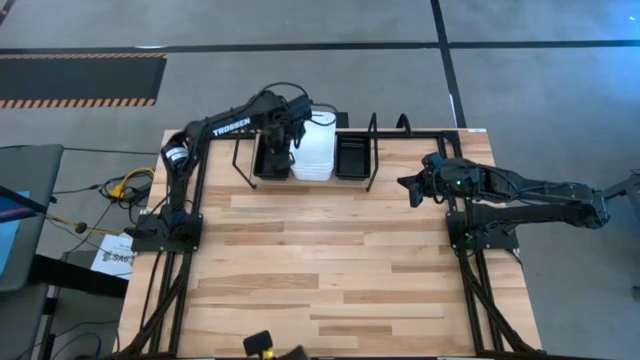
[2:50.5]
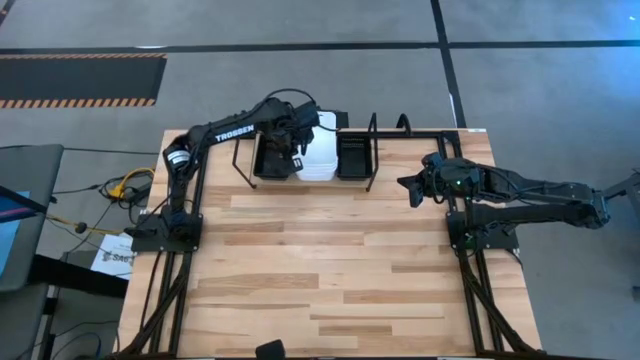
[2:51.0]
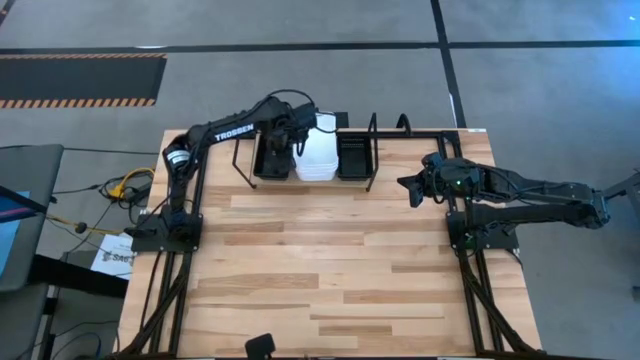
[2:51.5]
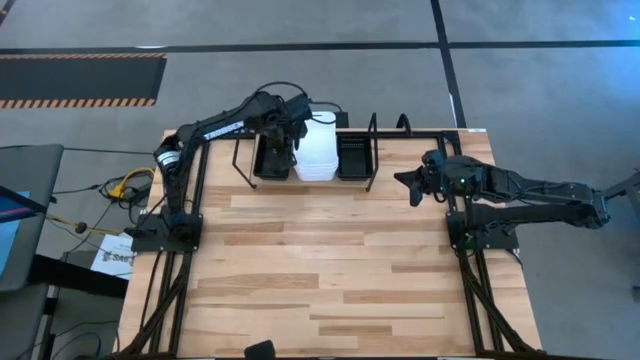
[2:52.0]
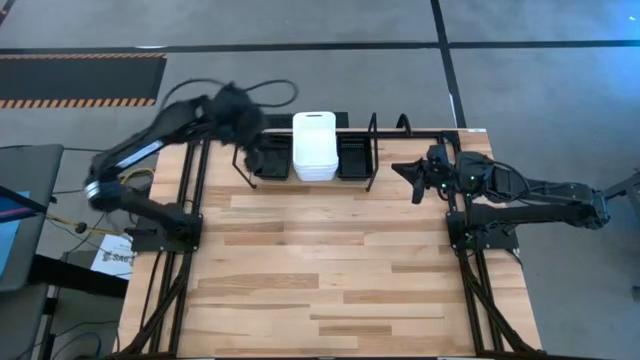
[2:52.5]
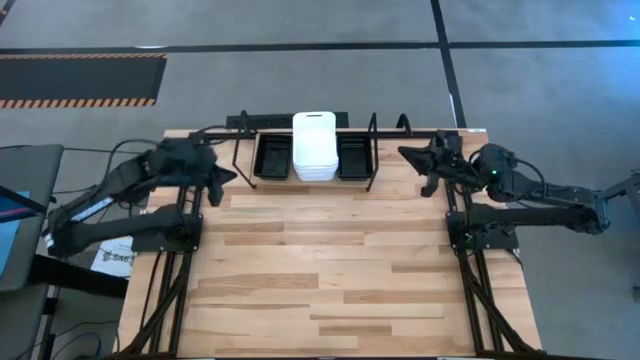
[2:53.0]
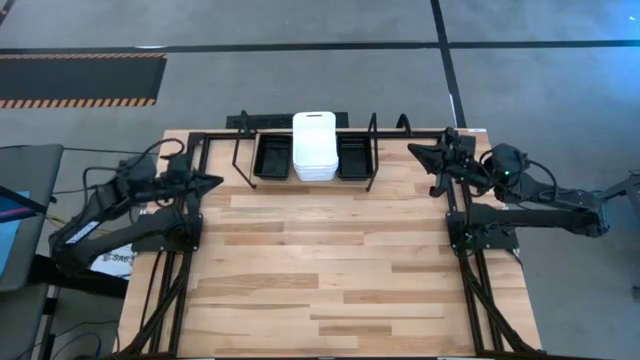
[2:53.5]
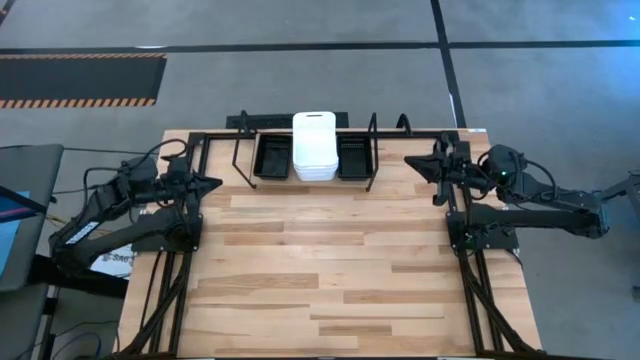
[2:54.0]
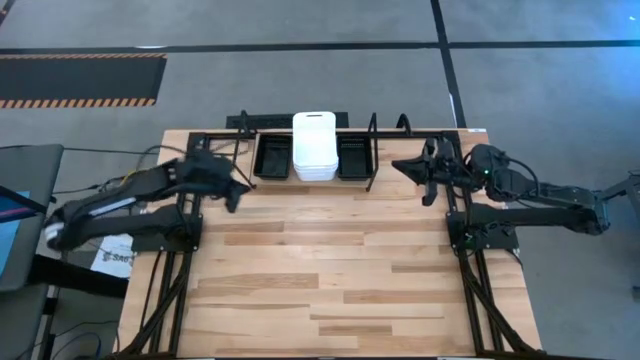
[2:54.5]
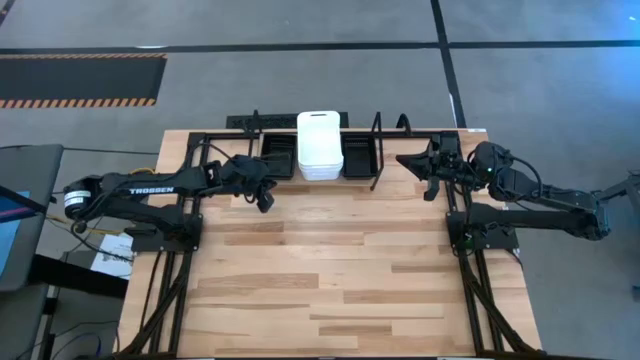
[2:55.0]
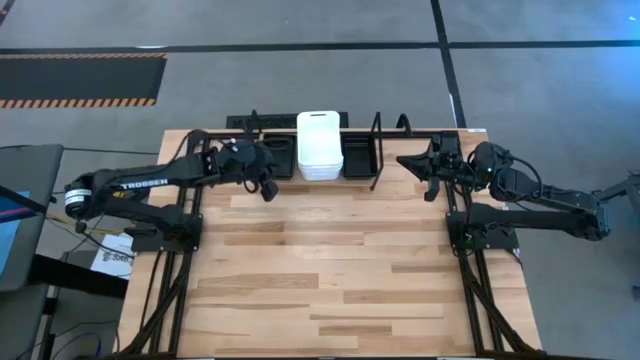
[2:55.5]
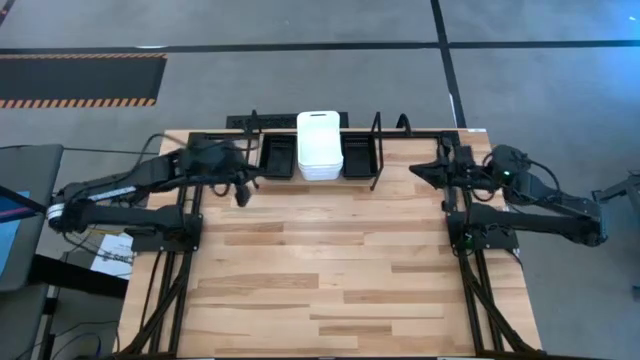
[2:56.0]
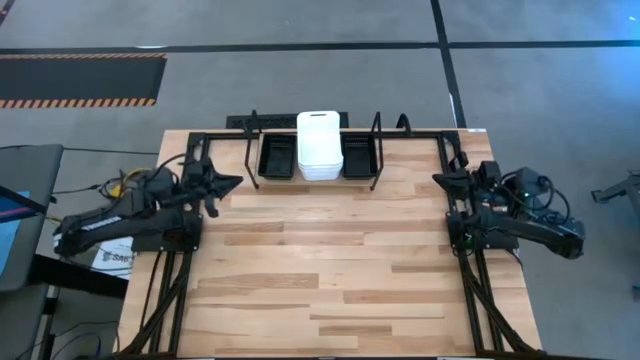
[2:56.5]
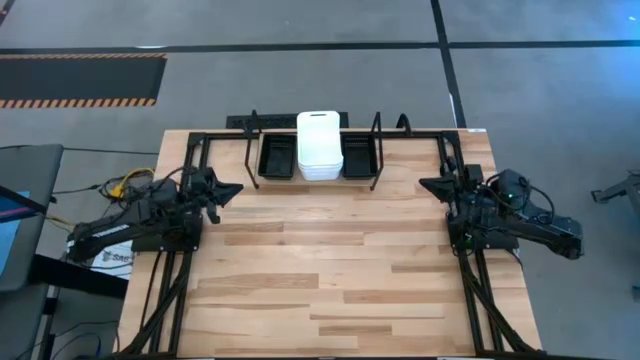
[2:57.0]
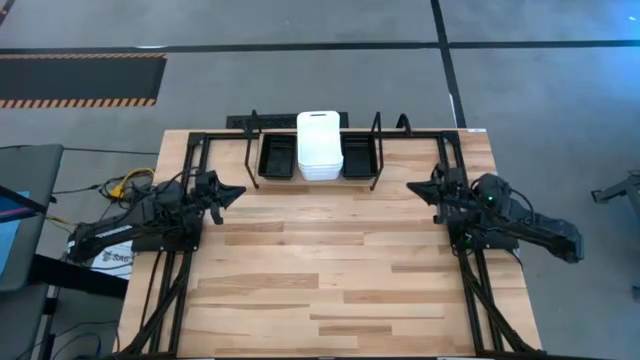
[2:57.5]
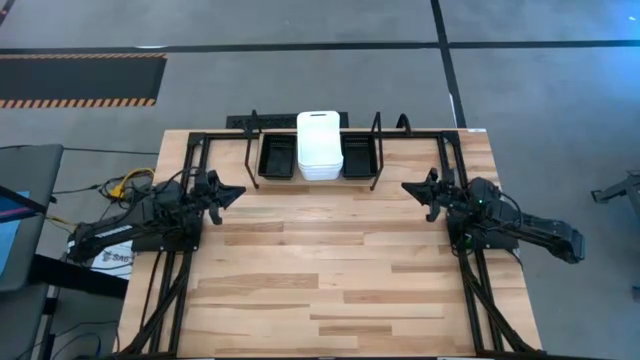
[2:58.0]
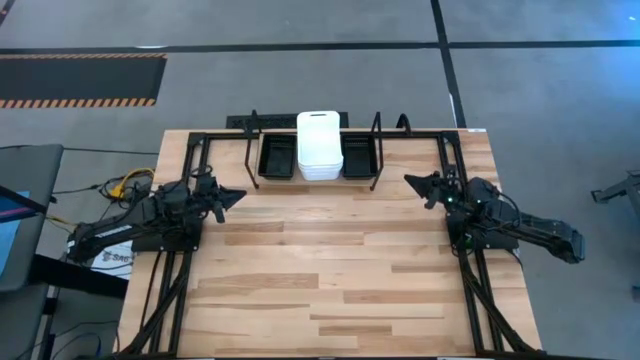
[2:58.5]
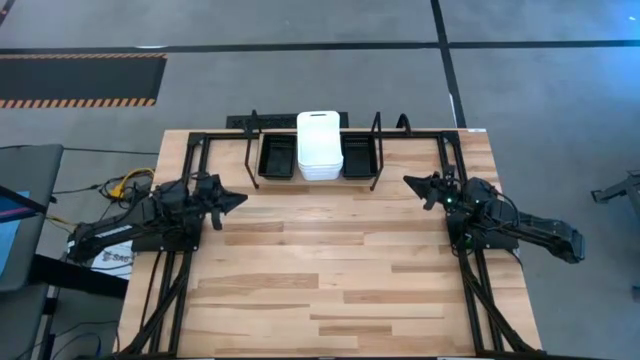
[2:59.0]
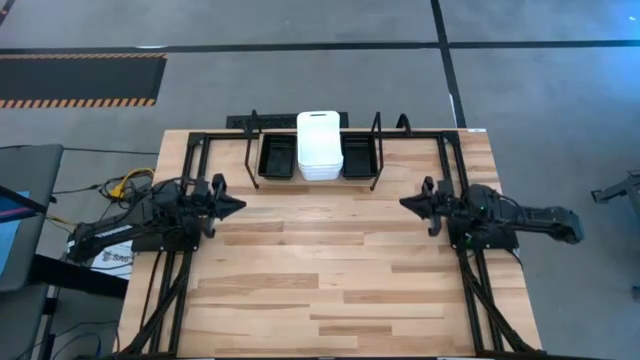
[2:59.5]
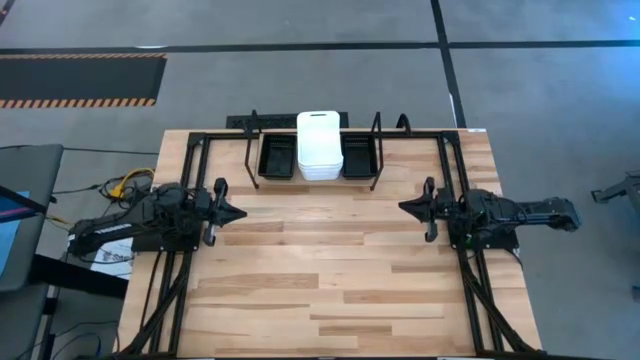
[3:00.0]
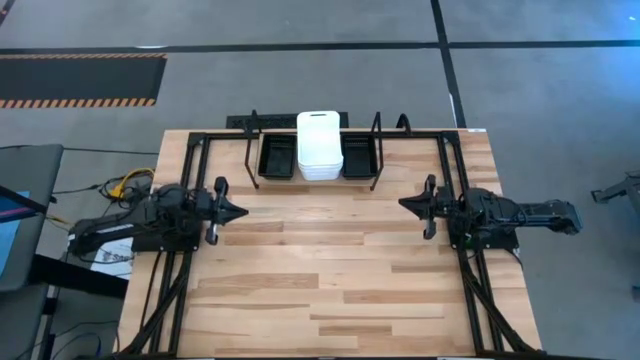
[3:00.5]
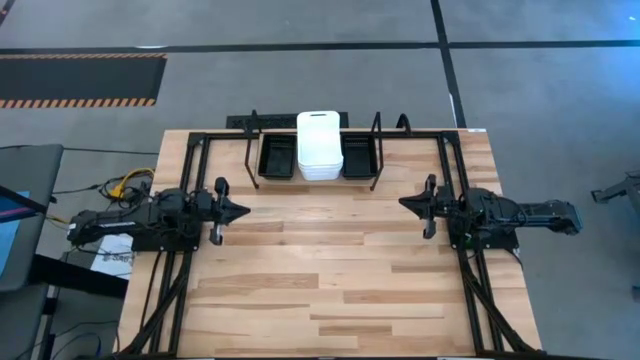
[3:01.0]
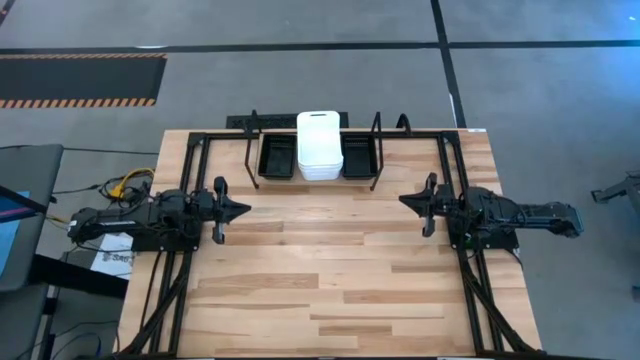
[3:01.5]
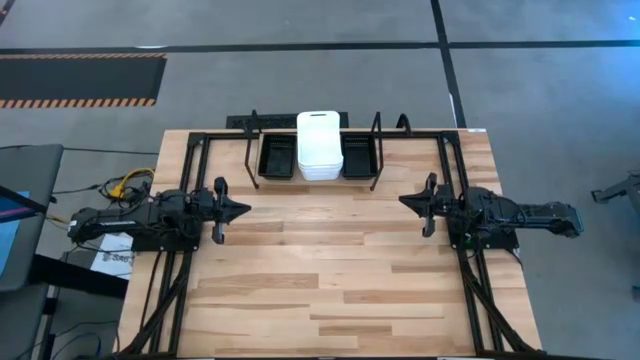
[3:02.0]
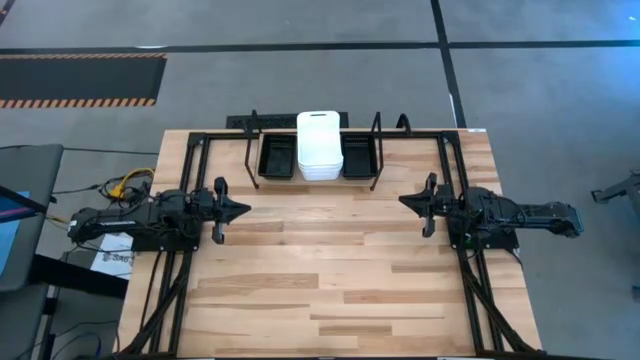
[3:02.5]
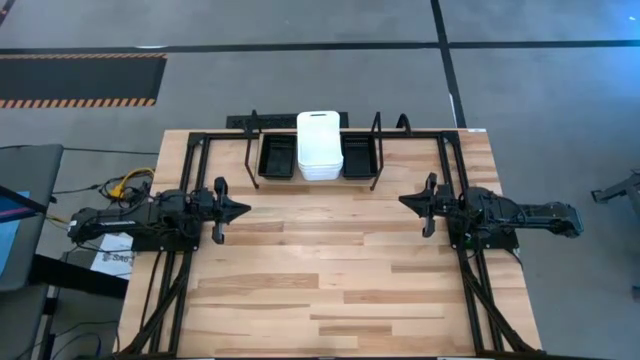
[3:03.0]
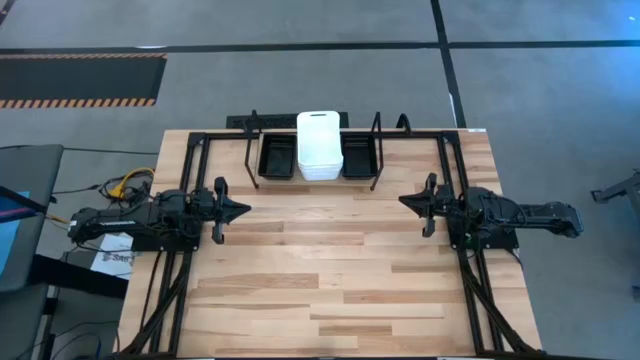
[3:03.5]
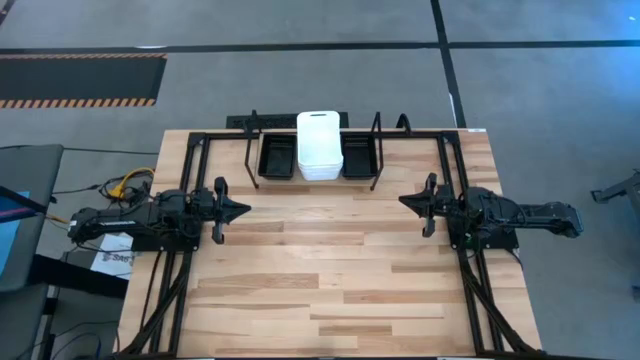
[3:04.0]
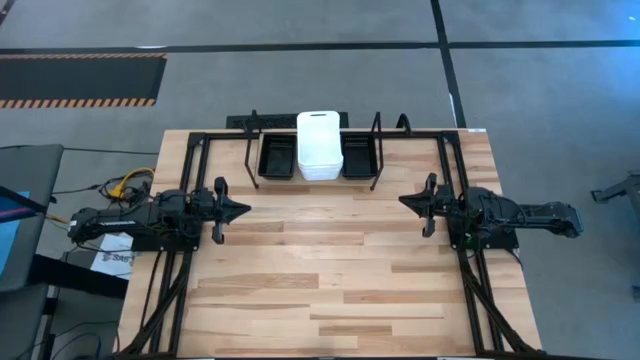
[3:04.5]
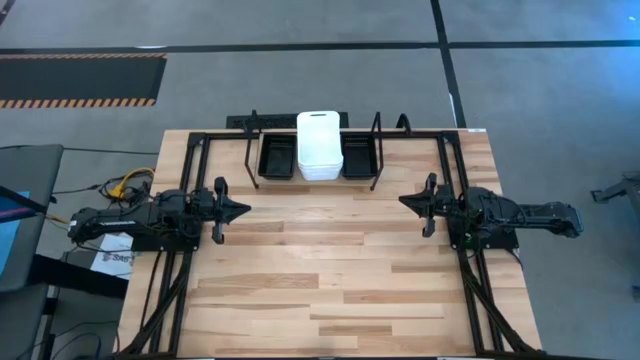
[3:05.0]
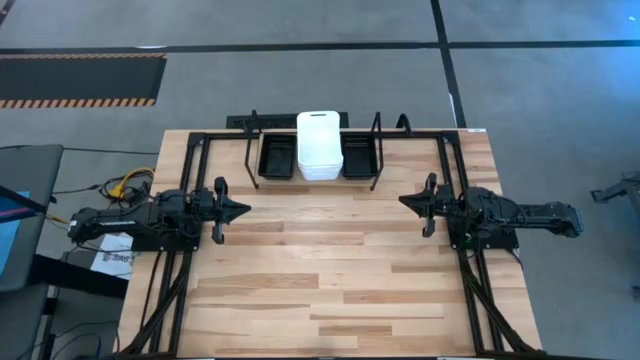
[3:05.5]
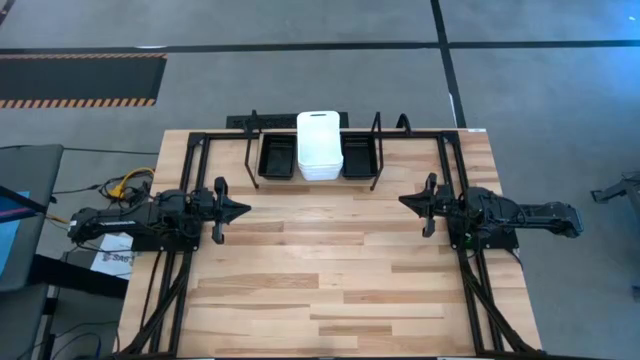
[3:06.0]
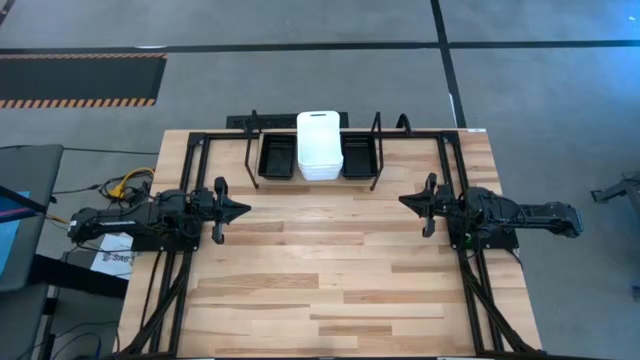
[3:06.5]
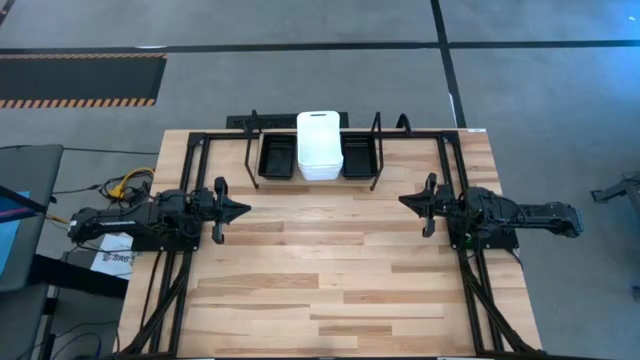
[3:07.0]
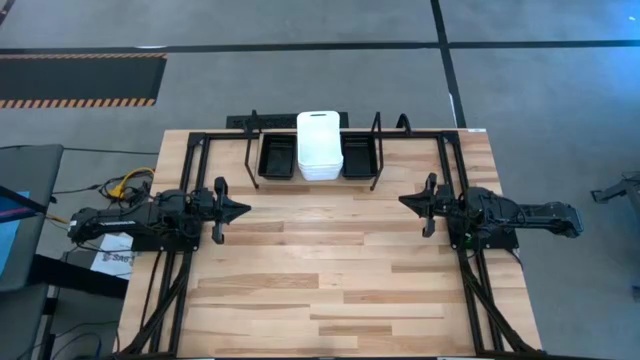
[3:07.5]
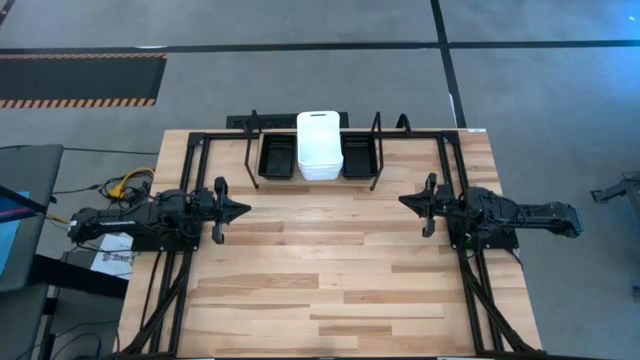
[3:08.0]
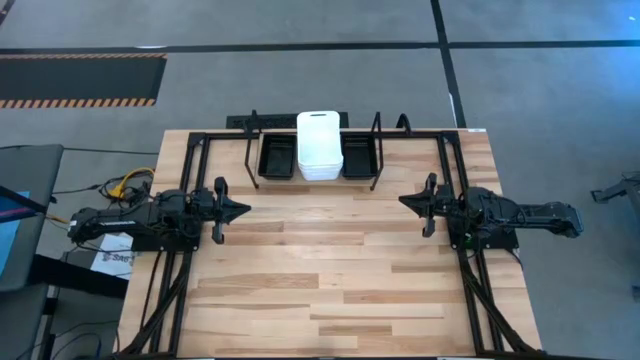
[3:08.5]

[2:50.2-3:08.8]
Task: Stack baskets on shelf by color
Return to Home Position

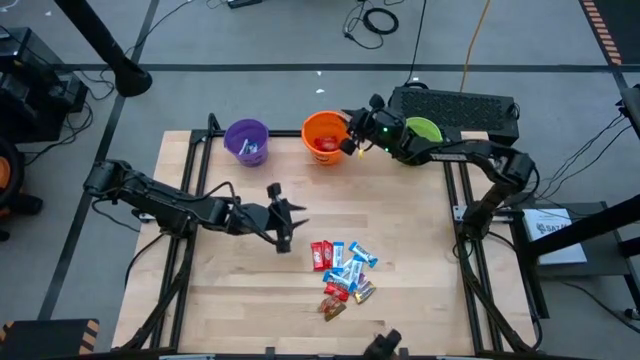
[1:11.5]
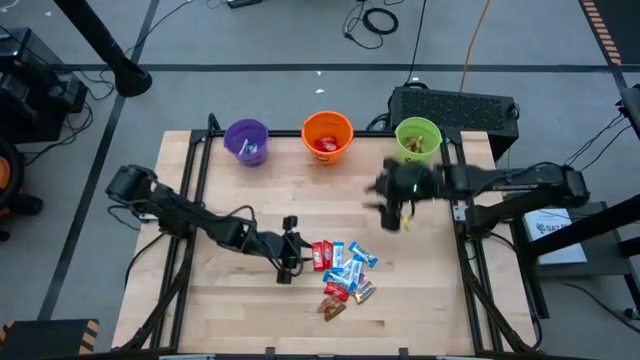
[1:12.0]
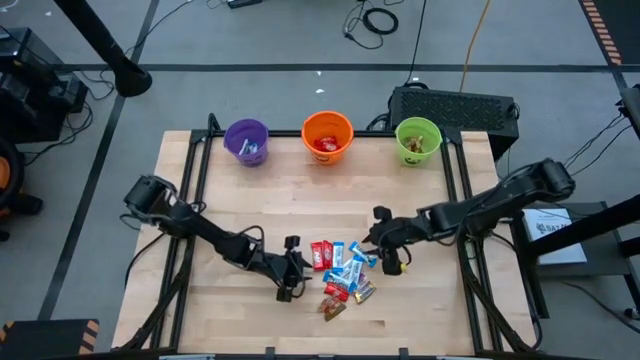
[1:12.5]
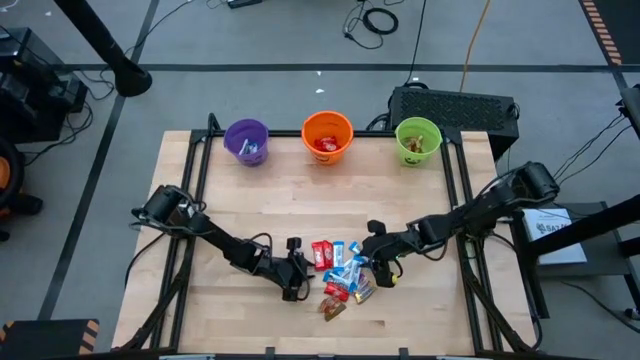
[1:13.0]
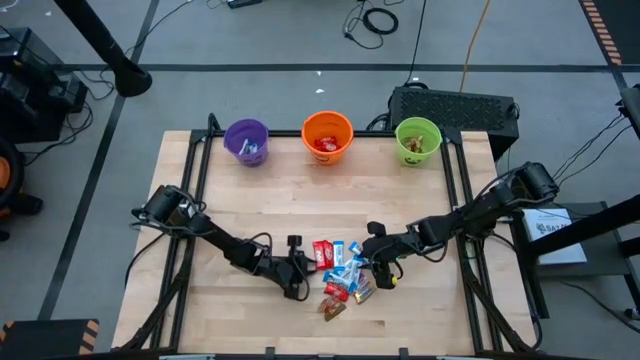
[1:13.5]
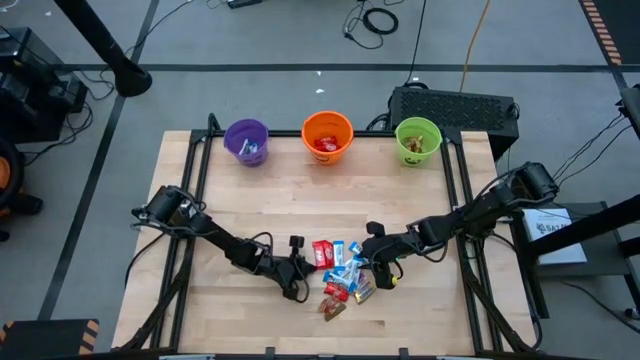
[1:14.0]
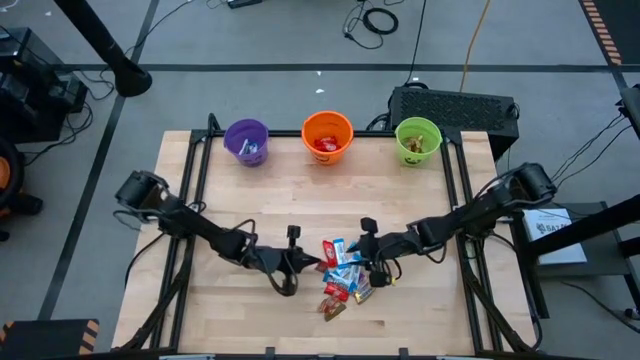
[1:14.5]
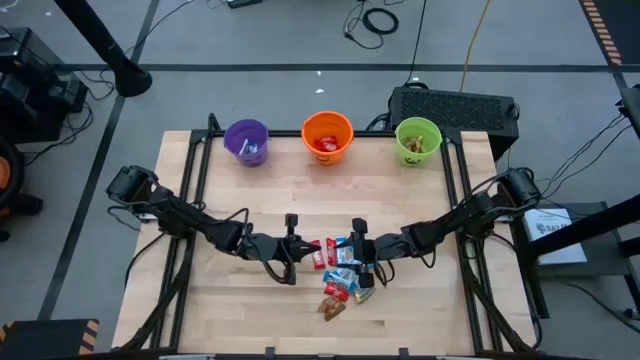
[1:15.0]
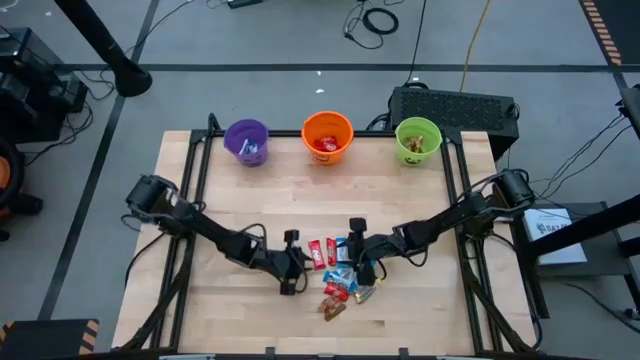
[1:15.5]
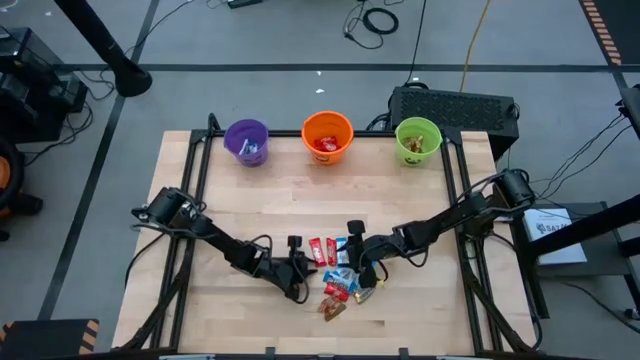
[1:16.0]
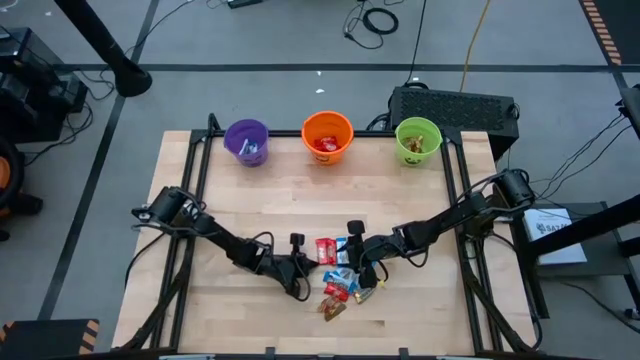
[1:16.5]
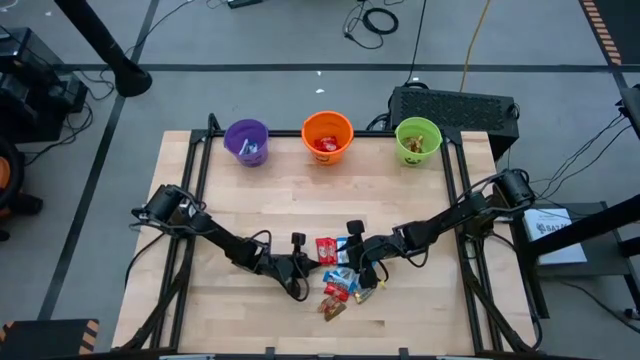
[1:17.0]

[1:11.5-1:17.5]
Task: Sort candy by brand, put in halloween buckets
Put the red chocolate into the orange bucket
